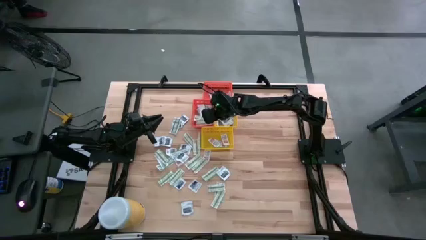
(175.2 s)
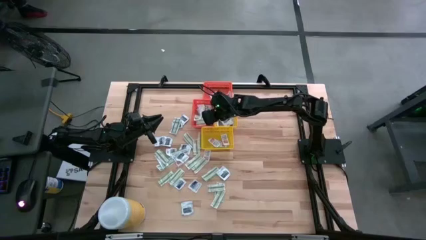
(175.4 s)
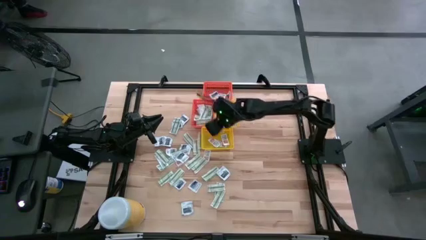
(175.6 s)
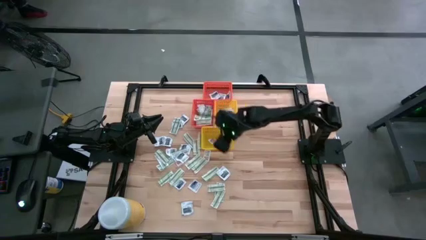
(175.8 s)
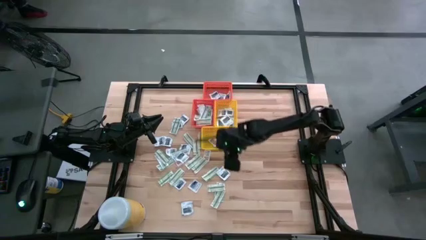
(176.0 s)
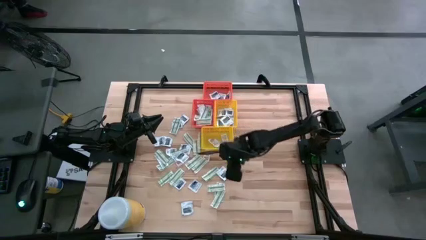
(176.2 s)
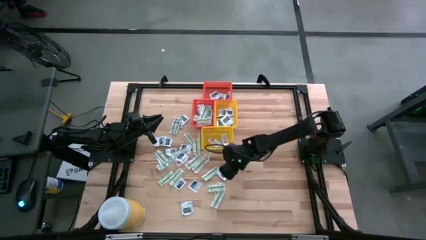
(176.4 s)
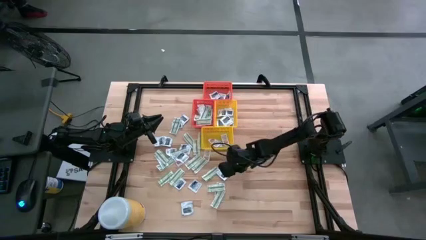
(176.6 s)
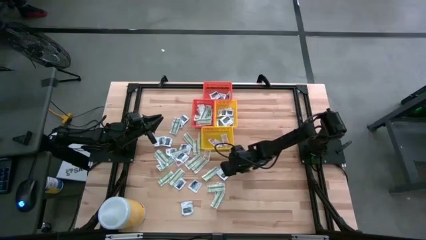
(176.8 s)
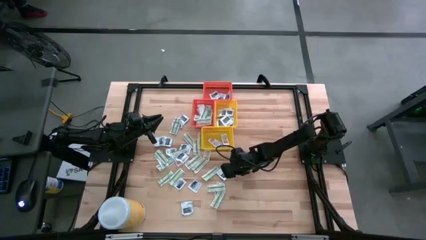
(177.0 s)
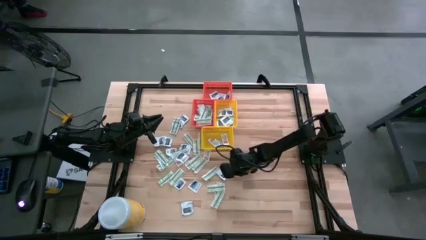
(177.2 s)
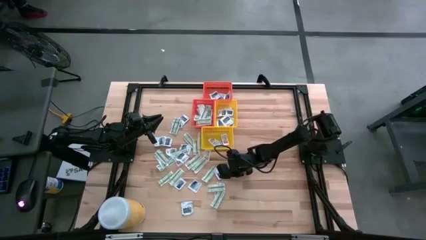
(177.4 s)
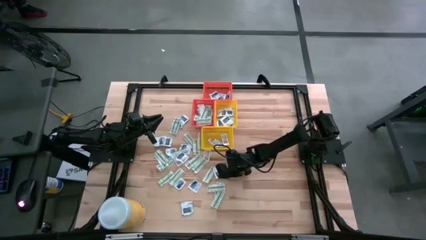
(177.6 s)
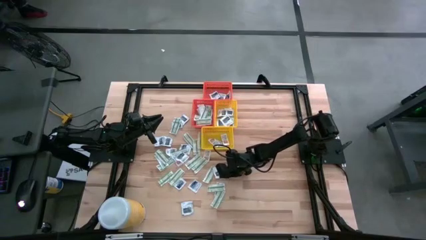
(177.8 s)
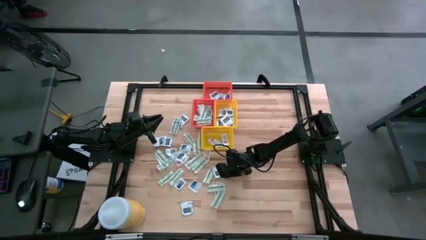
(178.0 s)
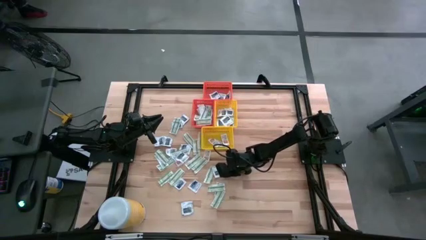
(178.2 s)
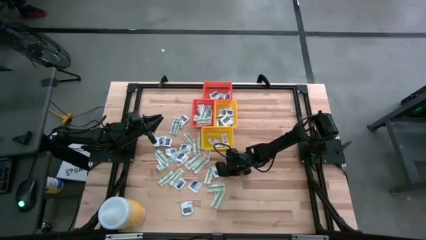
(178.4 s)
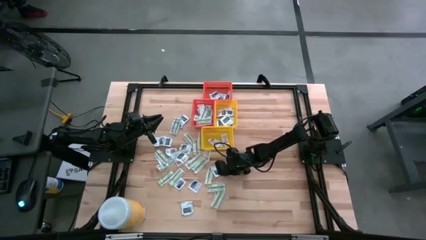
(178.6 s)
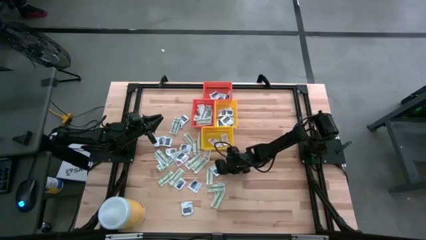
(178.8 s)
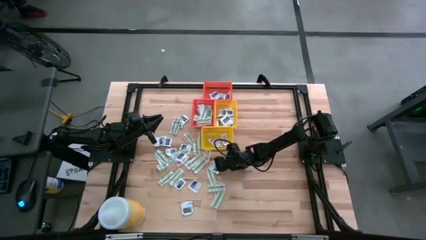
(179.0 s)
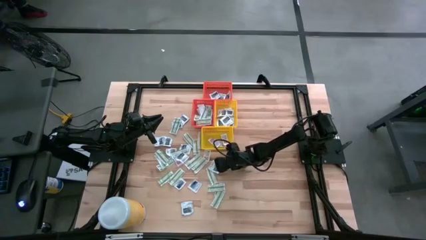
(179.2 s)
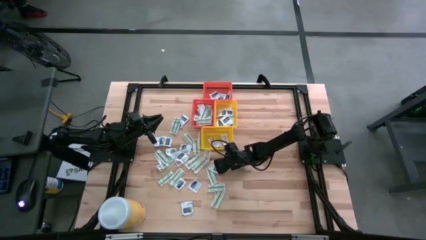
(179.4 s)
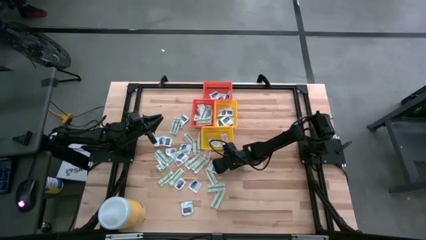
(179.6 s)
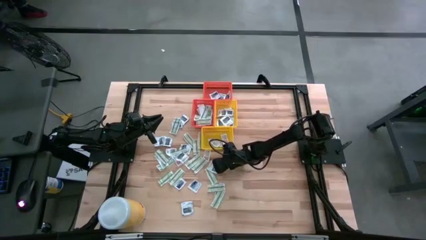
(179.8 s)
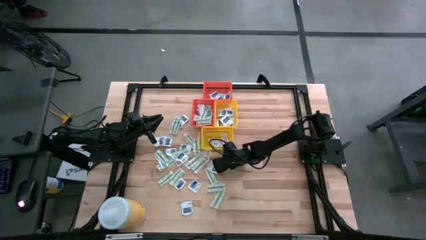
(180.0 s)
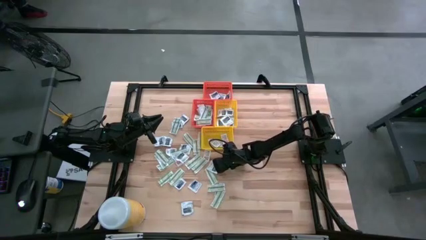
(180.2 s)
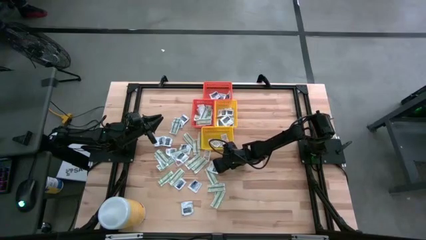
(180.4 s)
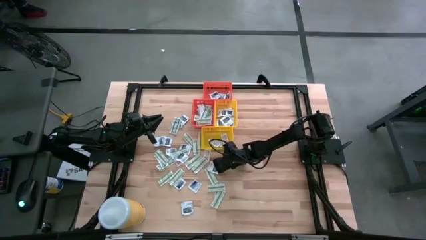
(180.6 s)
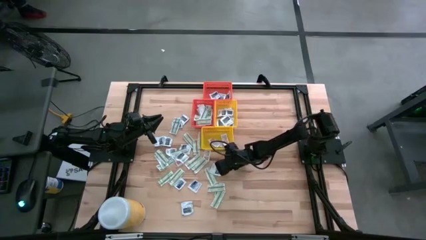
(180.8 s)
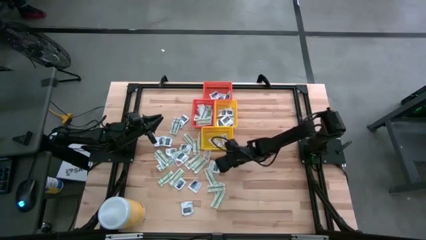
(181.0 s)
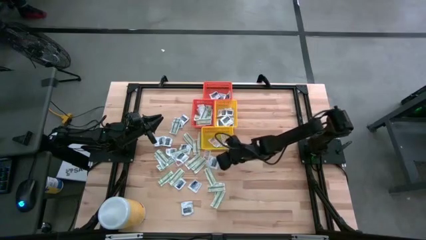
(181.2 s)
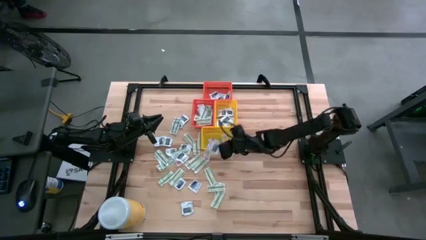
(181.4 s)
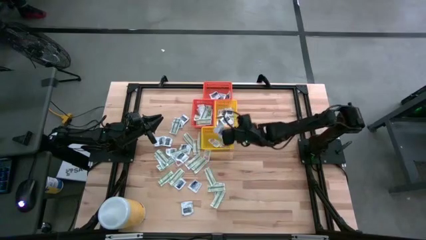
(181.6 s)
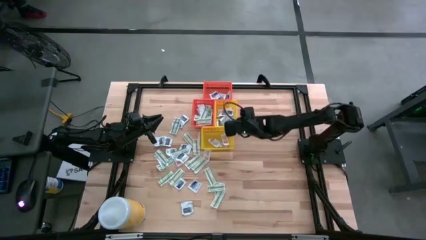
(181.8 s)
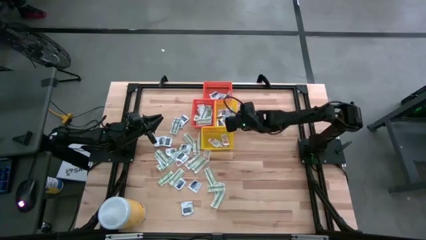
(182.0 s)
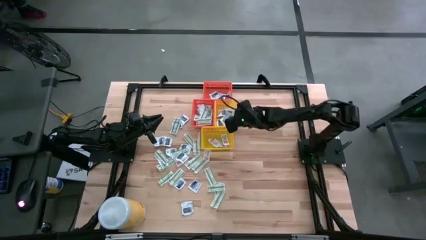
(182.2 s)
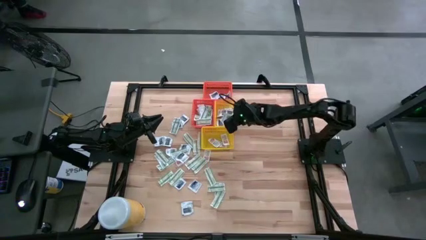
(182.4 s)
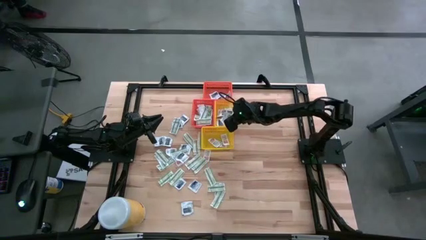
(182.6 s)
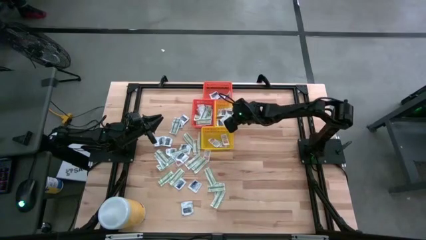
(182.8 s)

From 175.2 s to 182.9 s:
Task: Pick & Place First Aid Supplies
Put the towelette pack into the top yellow bin

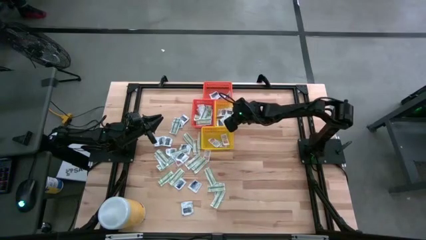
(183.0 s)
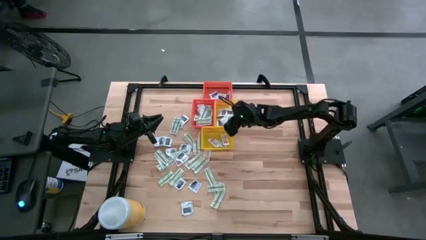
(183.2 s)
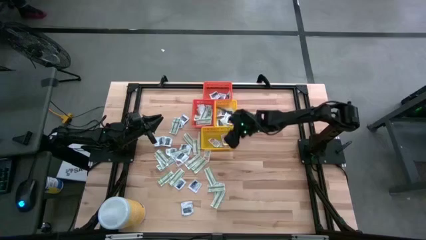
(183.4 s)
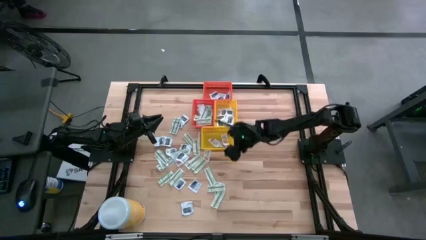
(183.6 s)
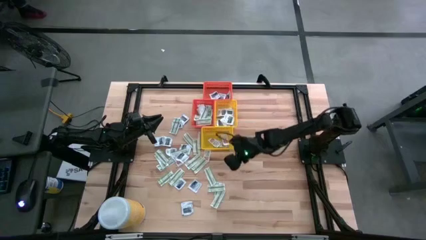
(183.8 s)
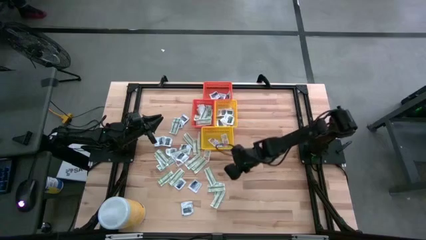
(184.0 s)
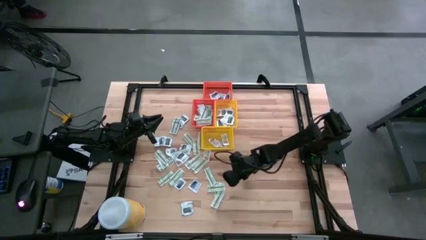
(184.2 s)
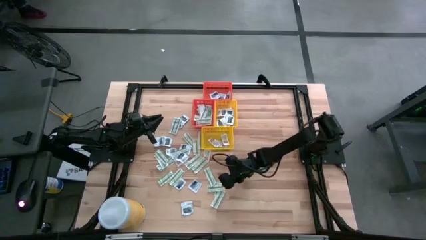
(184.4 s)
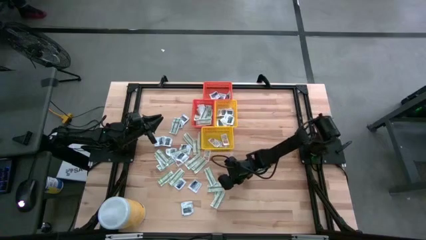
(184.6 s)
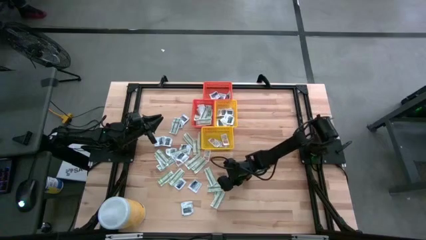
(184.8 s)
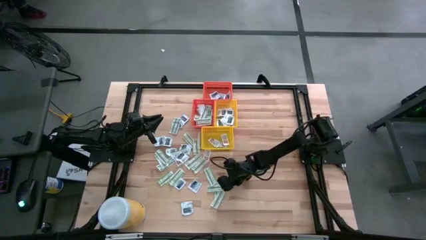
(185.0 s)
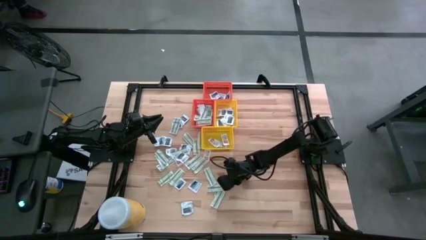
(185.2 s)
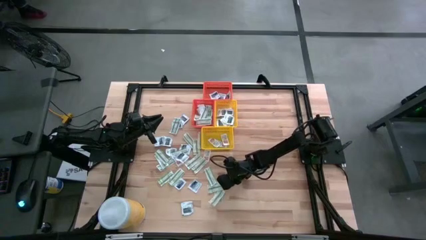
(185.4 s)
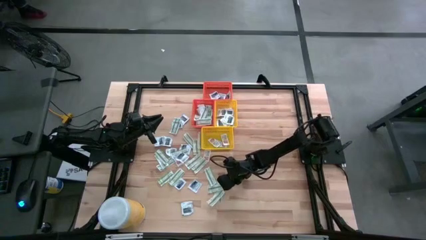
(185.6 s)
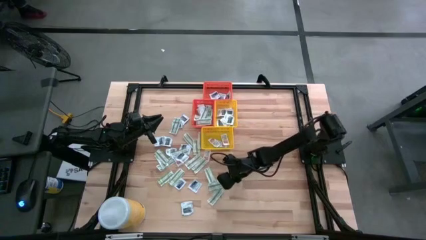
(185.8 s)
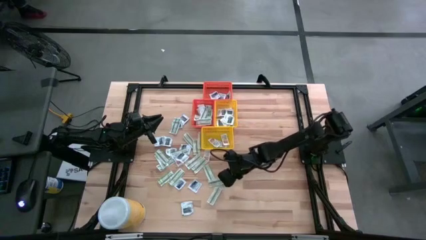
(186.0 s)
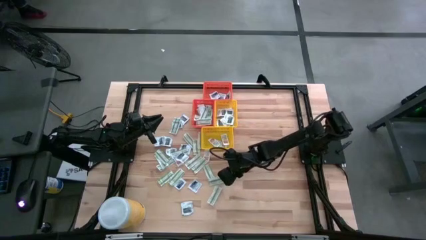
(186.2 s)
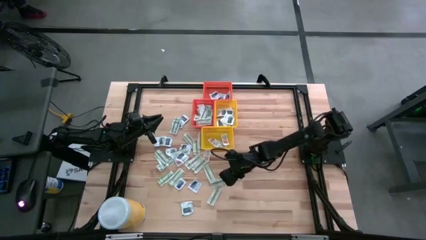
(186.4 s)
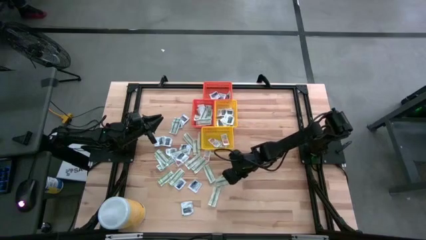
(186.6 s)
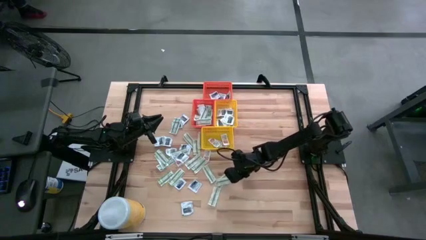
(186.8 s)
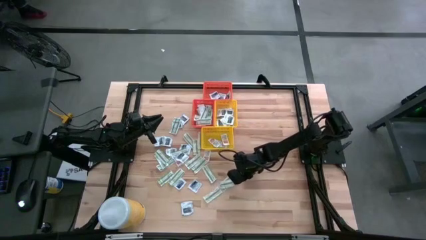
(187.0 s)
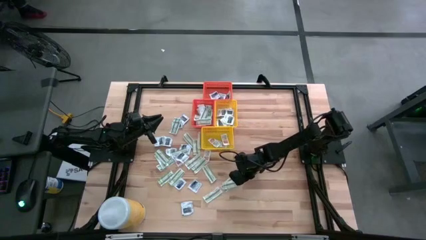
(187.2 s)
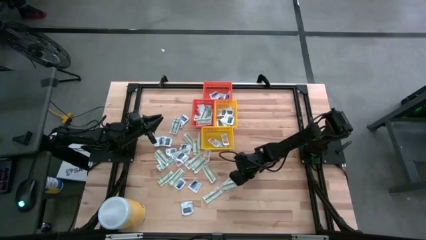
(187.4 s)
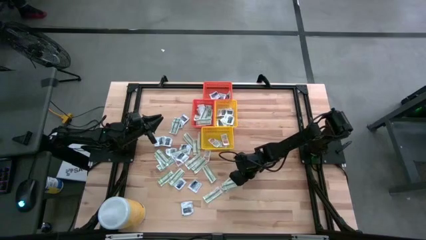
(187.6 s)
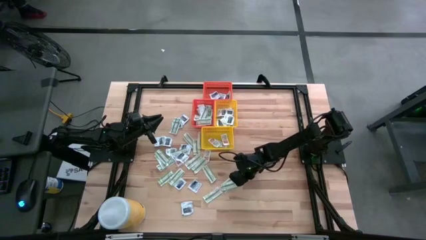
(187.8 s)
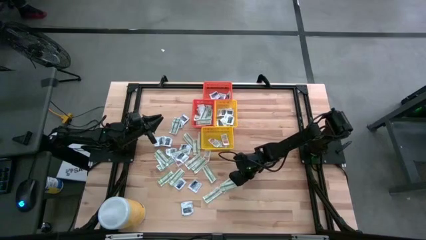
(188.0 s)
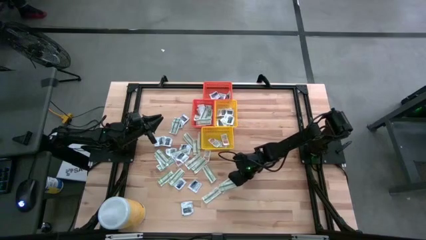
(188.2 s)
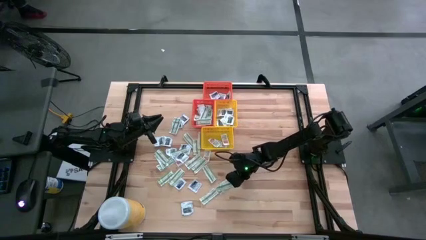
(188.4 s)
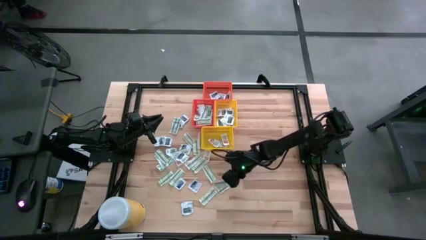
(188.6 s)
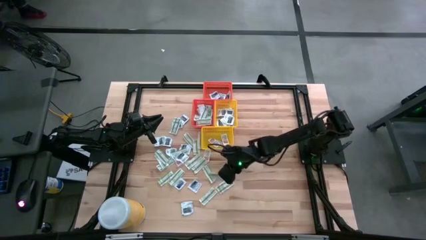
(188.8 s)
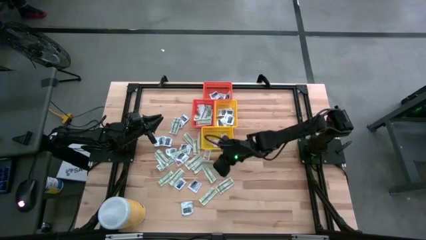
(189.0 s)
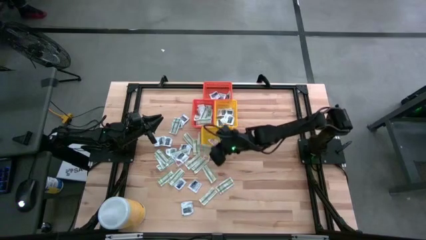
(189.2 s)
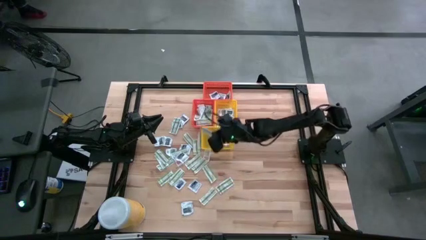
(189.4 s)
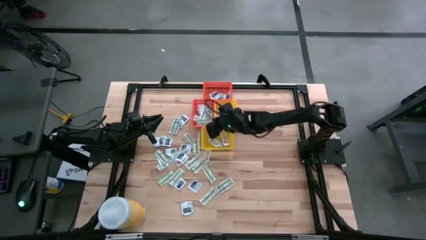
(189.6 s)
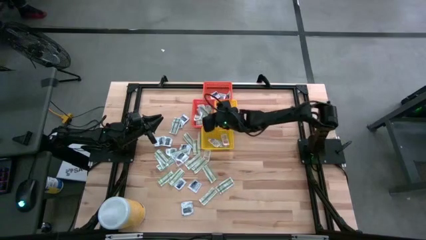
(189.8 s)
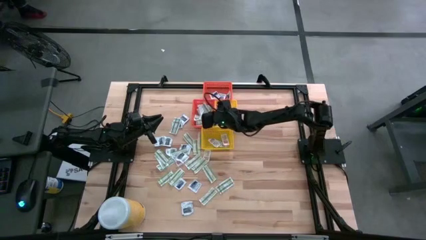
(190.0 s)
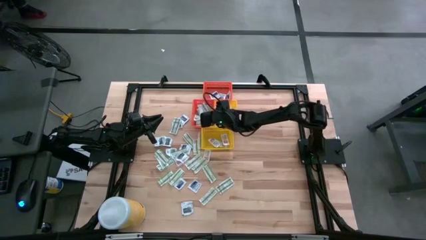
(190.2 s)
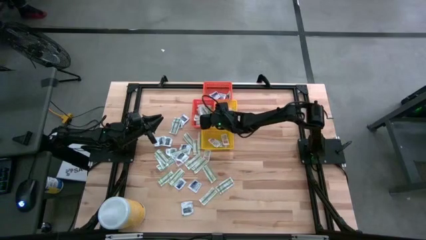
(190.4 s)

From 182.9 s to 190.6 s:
Put the bandage into the bottom orange bin
